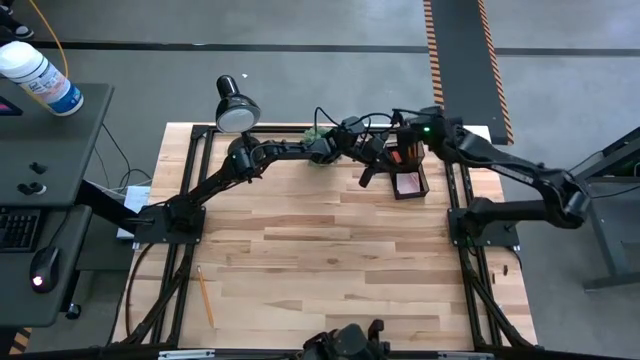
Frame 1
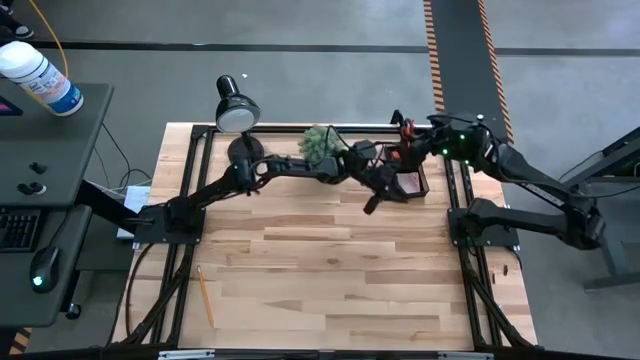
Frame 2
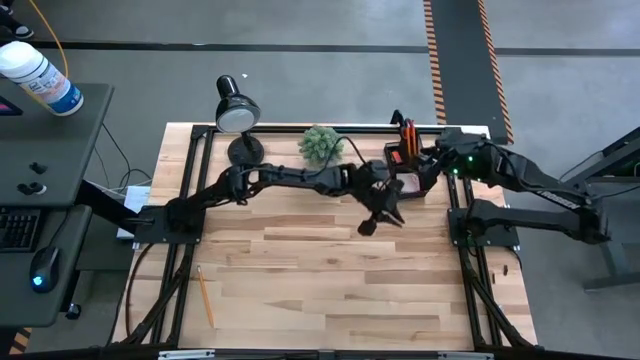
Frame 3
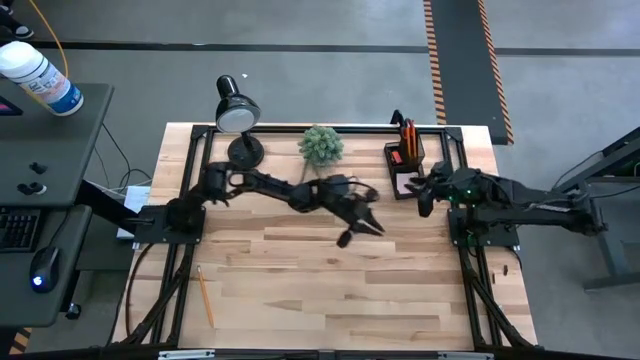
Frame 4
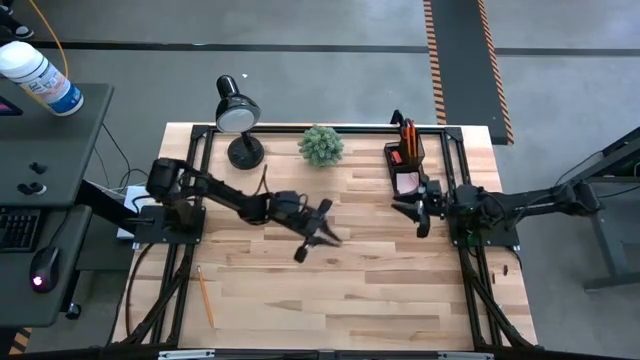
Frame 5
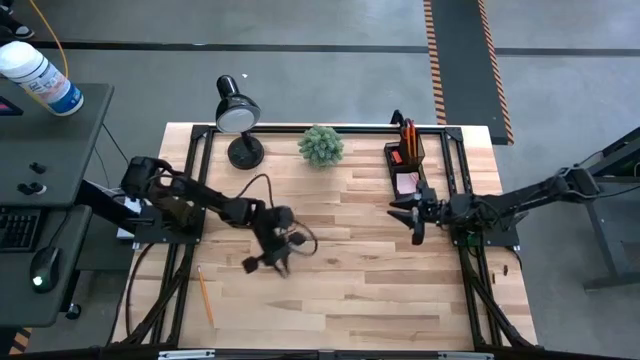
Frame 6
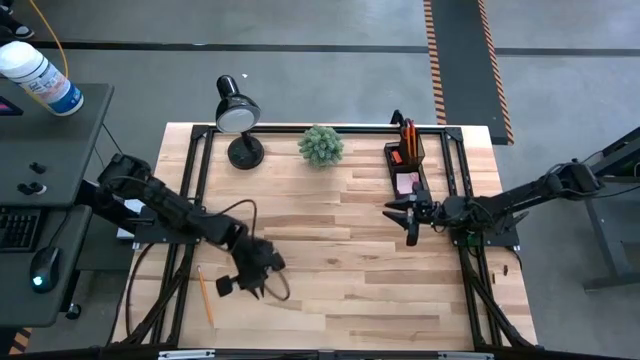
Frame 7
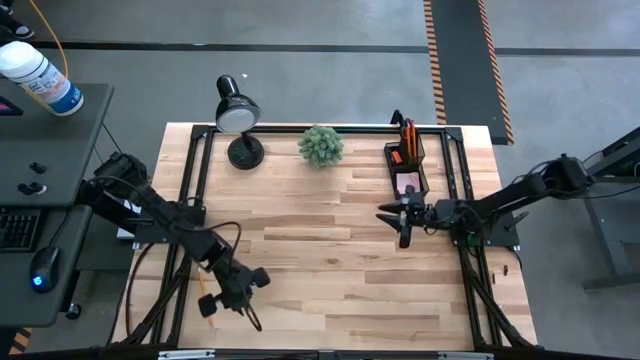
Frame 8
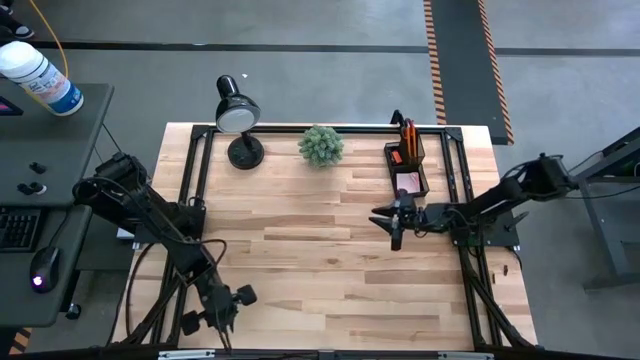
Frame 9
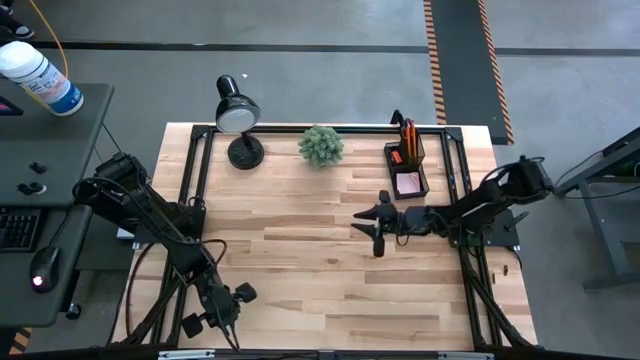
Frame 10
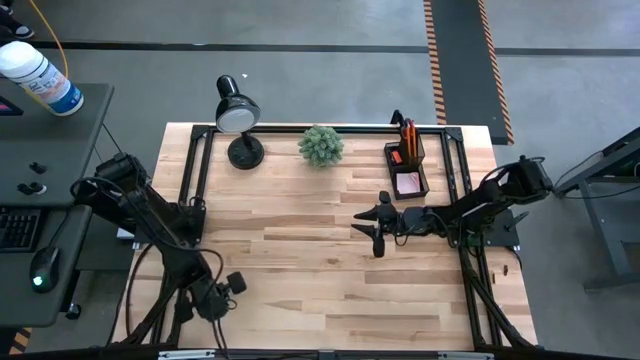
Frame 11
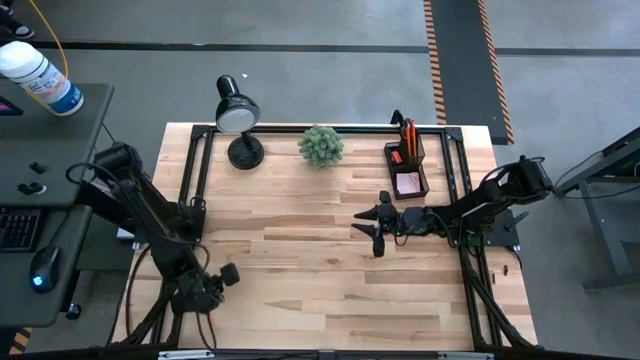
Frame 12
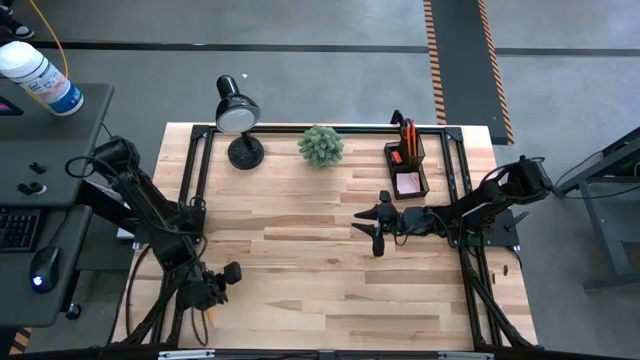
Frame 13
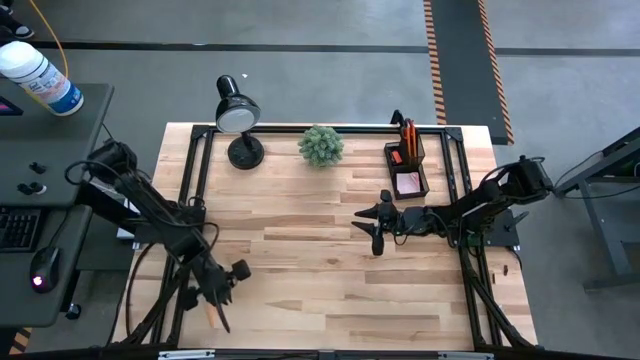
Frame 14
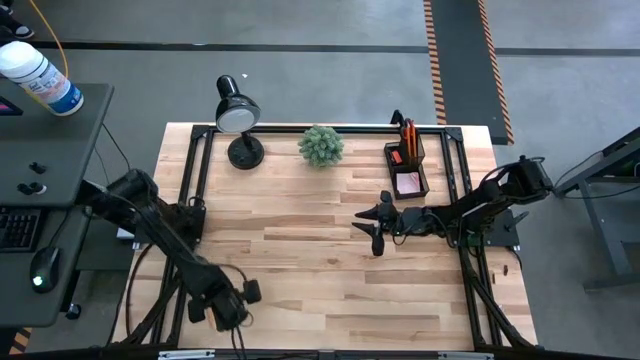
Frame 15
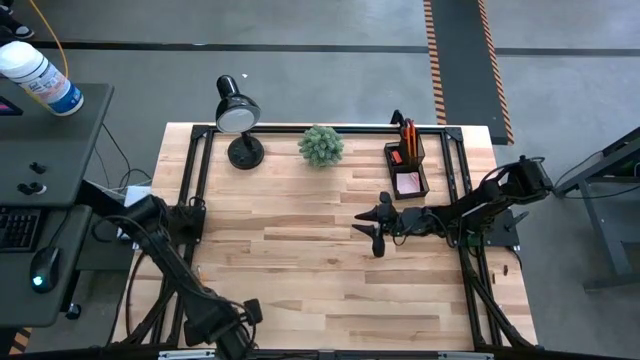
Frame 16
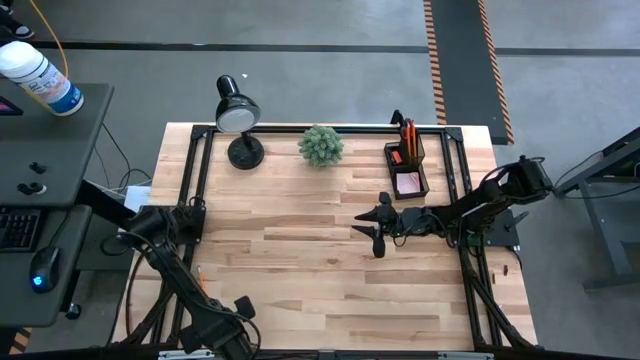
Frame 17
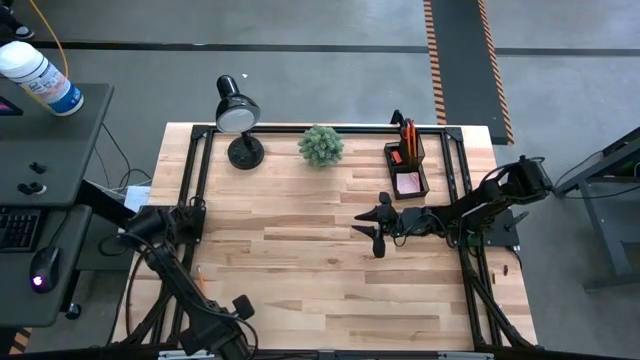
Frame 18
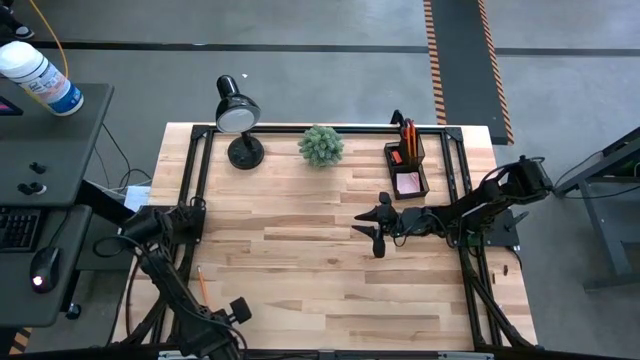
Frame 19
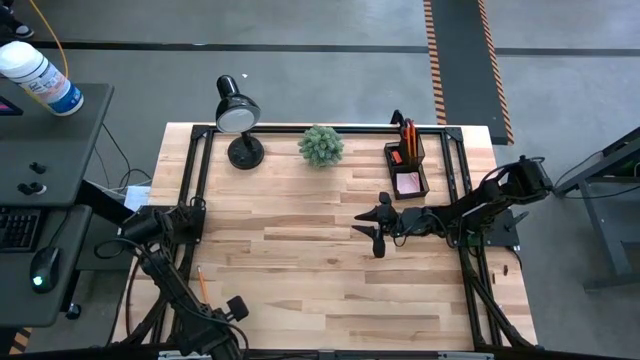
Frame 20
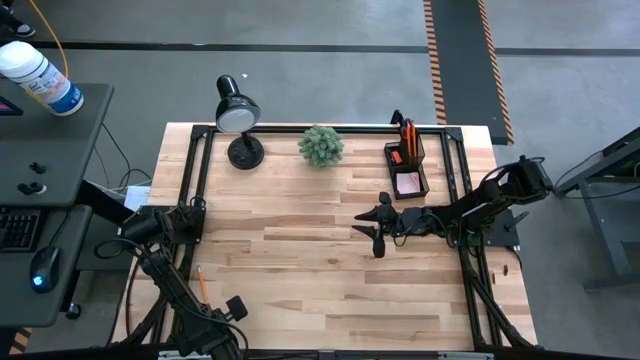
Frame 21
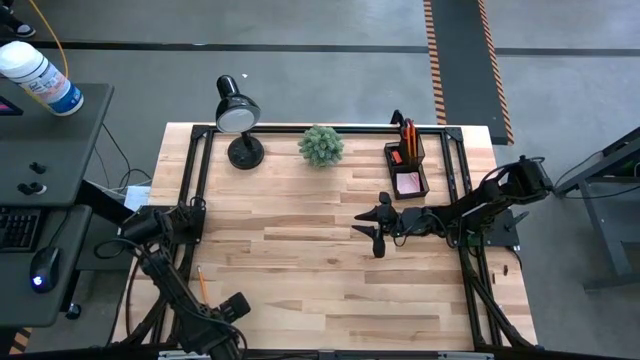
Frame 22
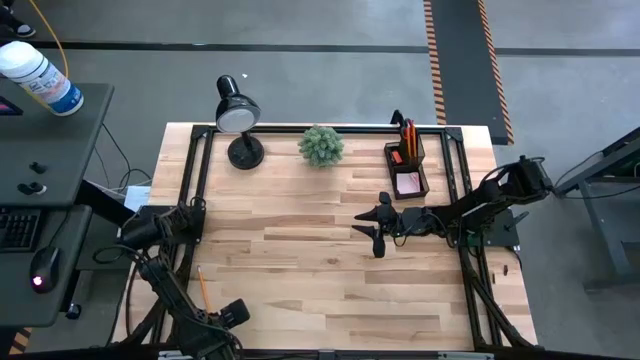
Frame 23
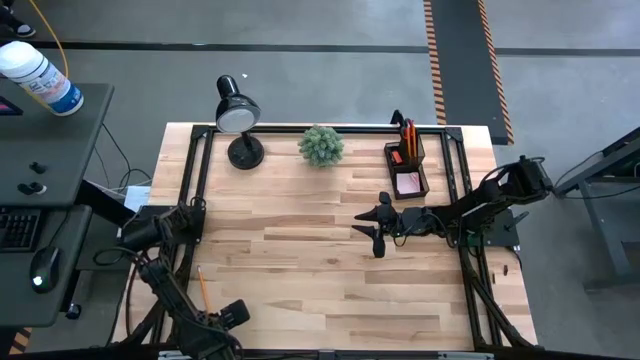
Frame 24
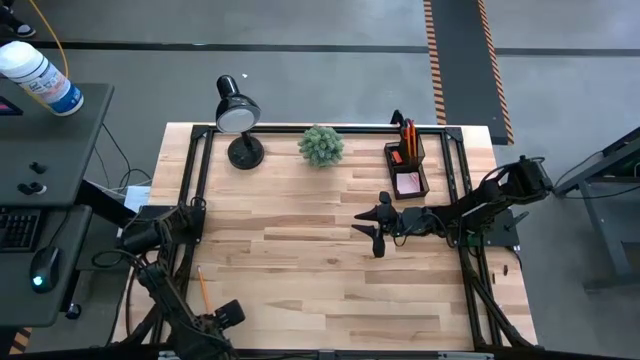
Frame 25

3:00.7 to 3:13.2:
Task: Pick and place office supplies into organizer
Put the pencil into the desk organizer

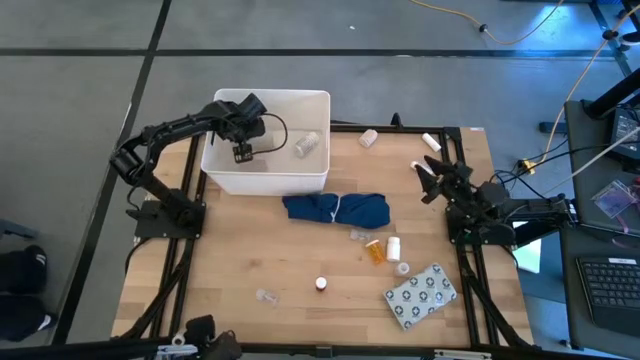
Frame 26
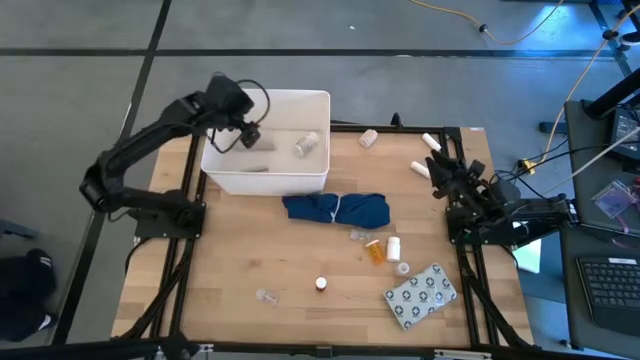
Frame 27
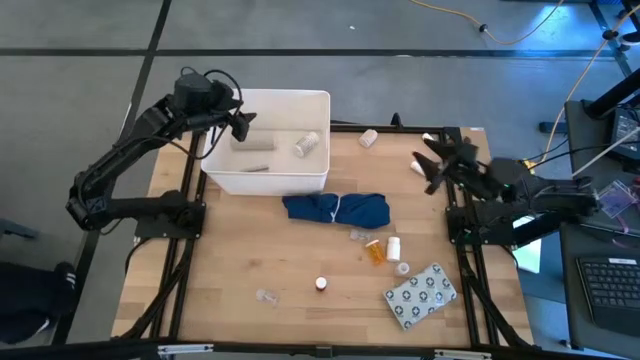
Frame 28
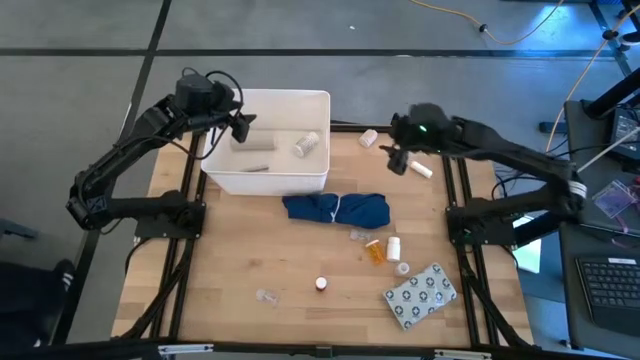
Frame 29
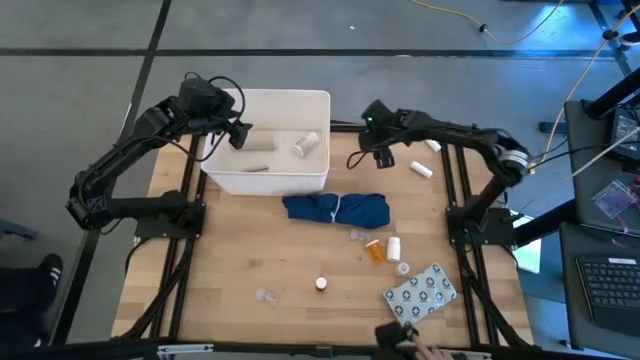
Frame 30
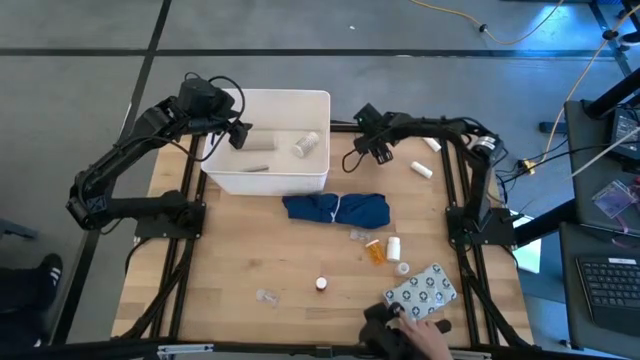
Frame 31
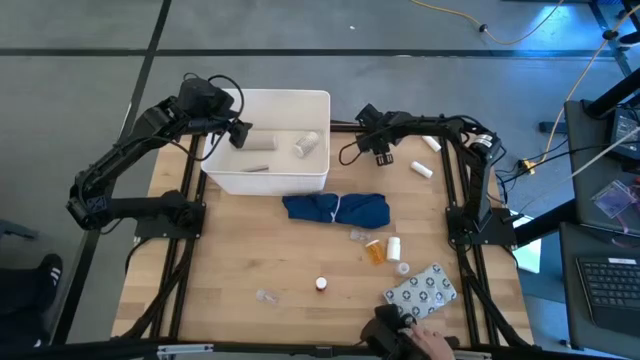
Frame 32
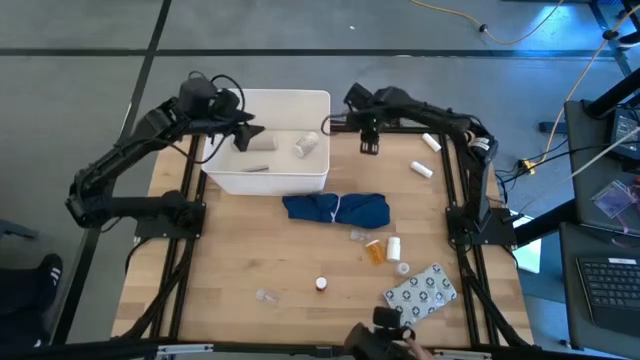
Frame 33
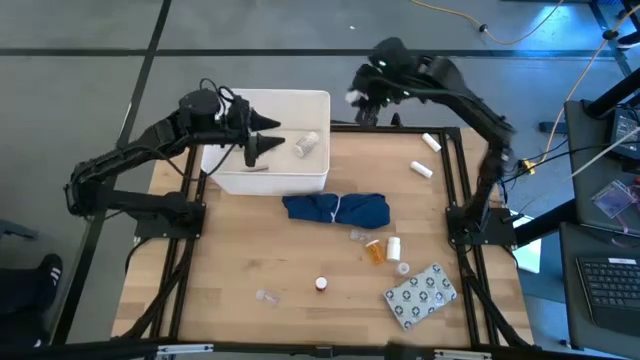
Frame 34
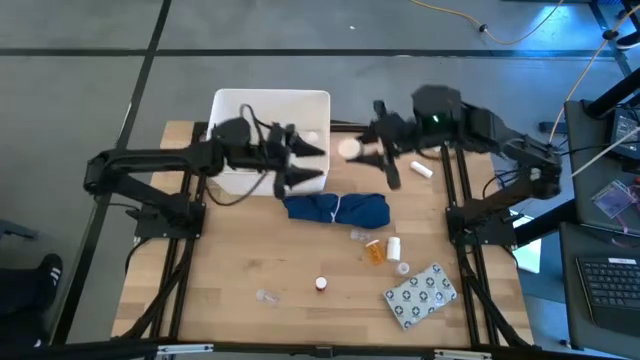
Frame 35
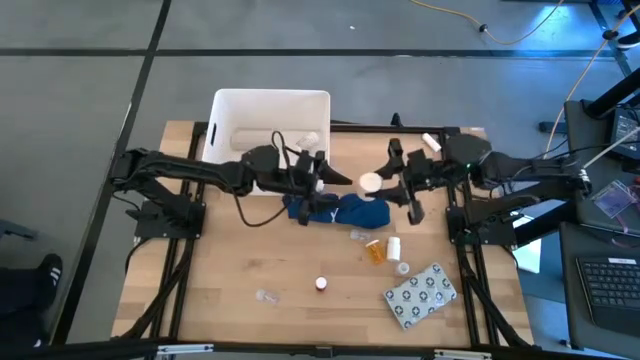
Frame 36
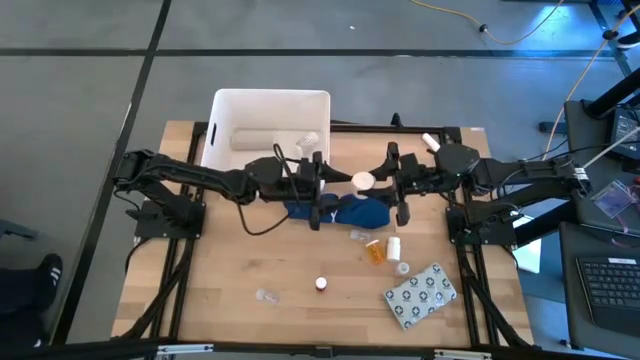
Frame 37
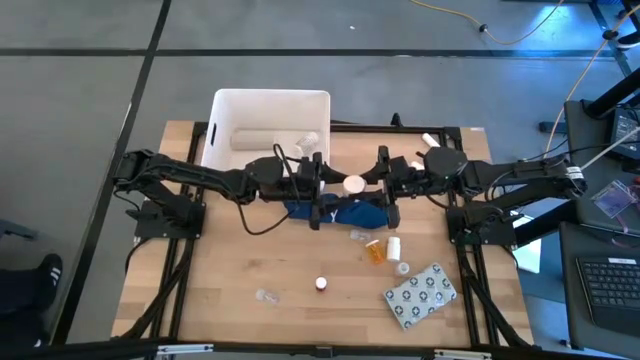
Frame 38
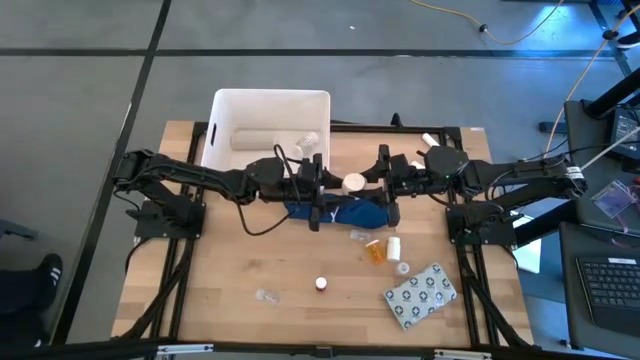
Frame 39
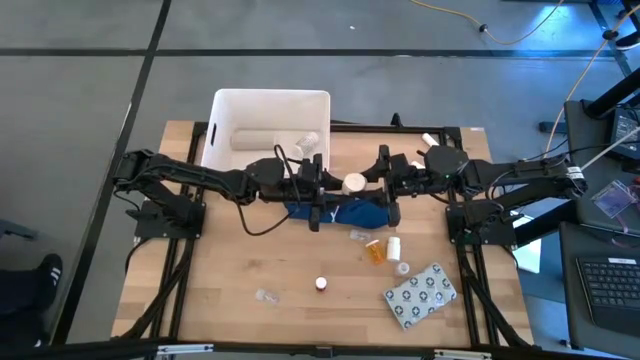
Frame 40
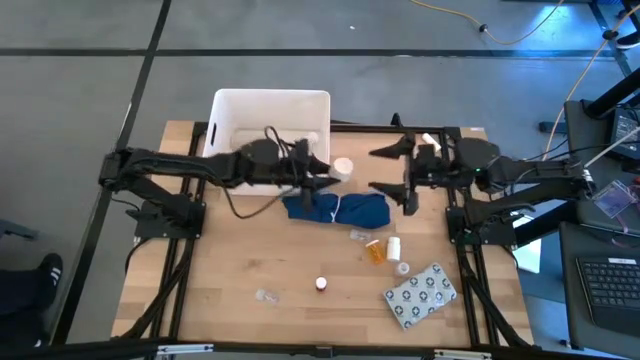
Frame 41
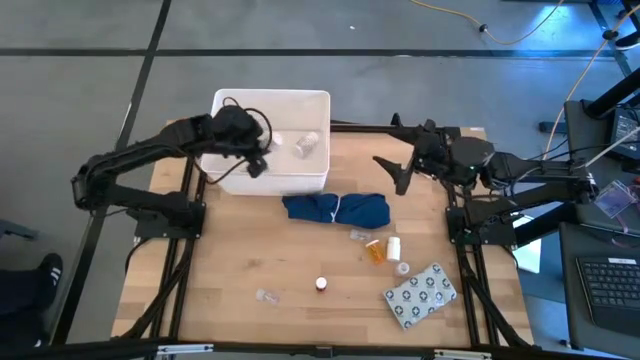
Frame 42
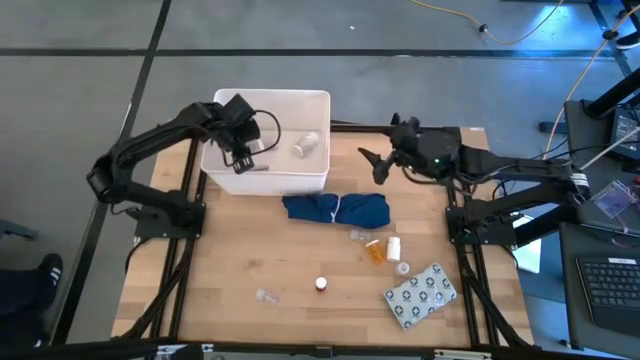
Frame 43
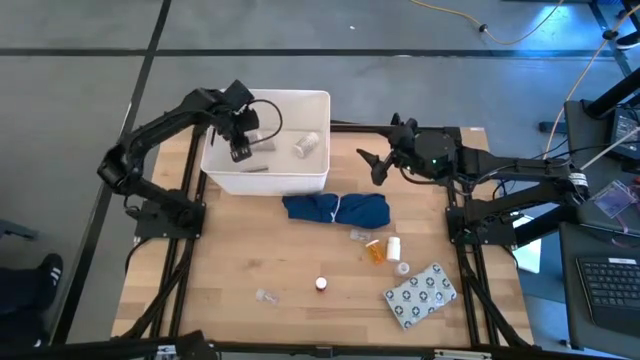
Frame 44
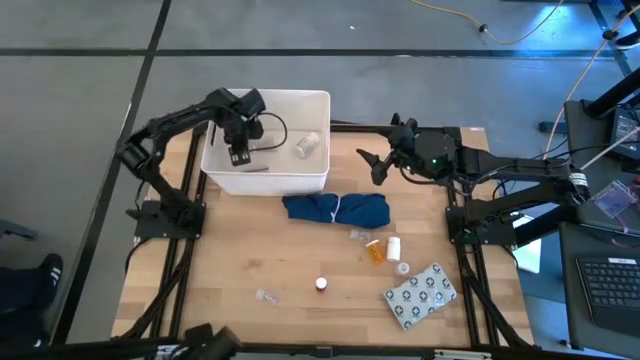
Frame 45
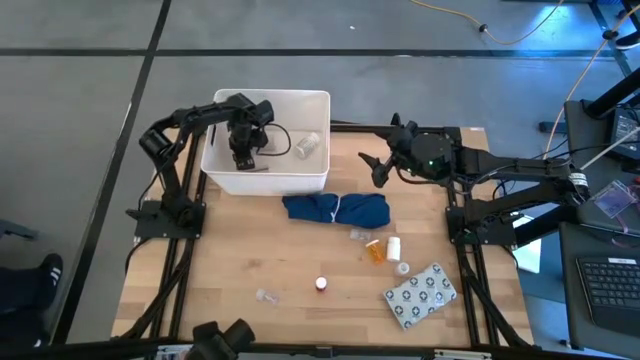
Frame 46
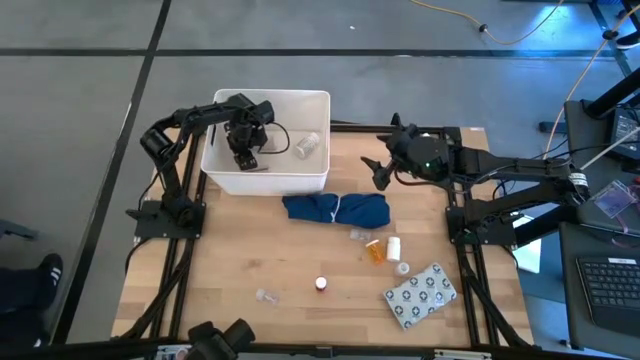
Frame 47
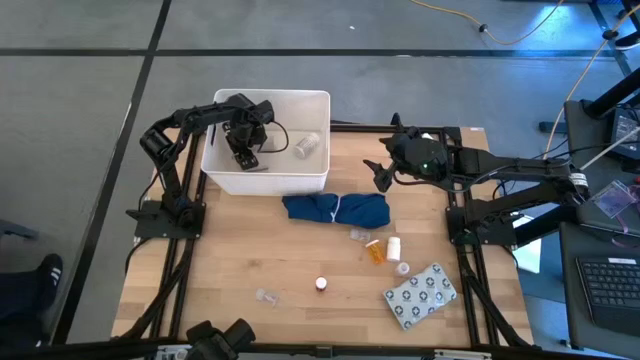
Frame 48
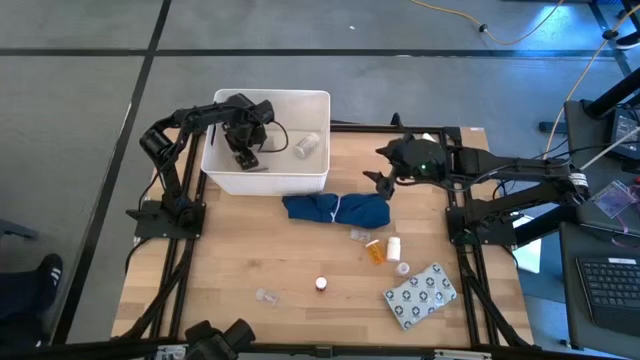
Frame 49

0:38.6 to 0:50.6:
Task: Pick & place medical supplies in basket/bin
Put the white bandage into the white container
